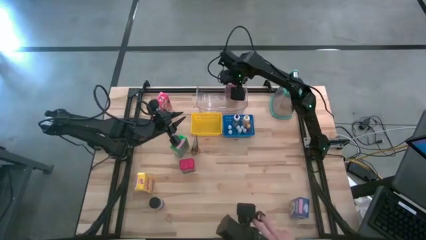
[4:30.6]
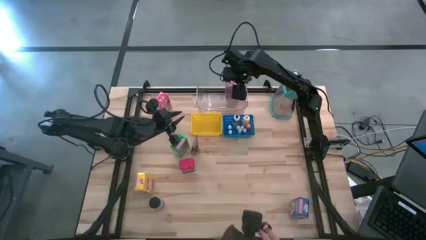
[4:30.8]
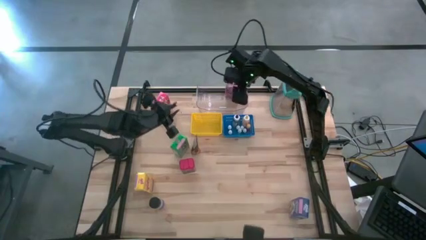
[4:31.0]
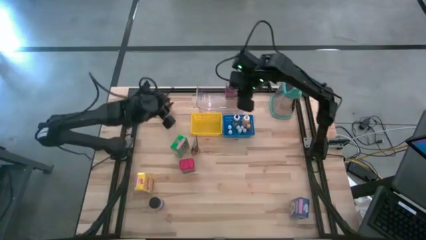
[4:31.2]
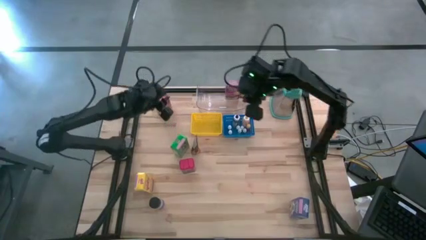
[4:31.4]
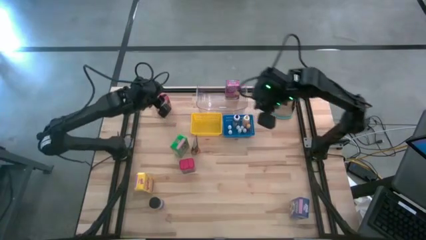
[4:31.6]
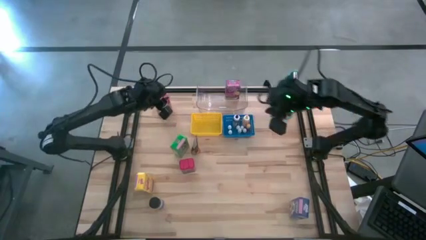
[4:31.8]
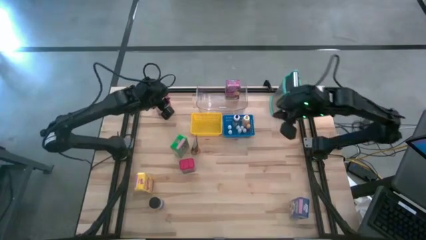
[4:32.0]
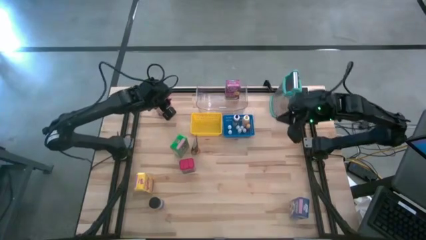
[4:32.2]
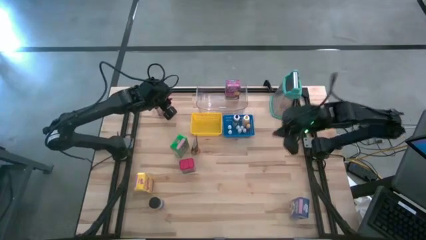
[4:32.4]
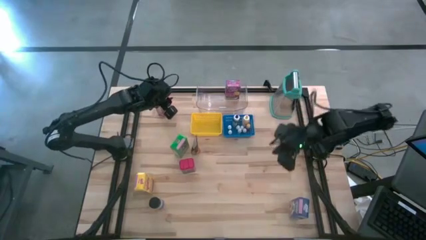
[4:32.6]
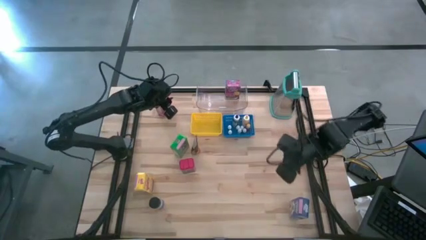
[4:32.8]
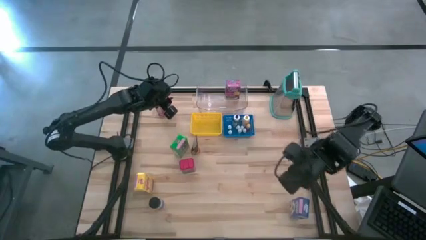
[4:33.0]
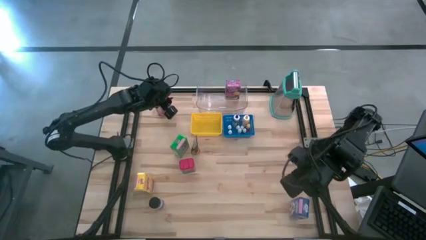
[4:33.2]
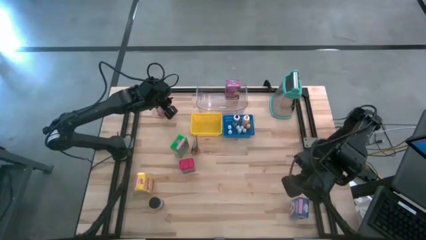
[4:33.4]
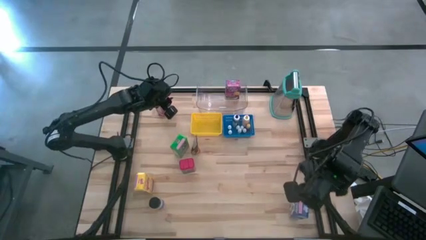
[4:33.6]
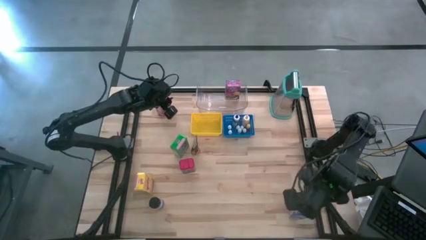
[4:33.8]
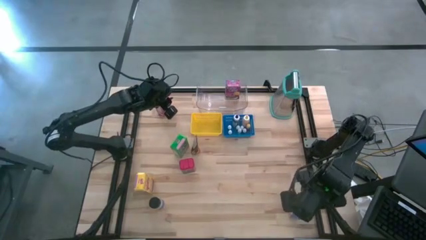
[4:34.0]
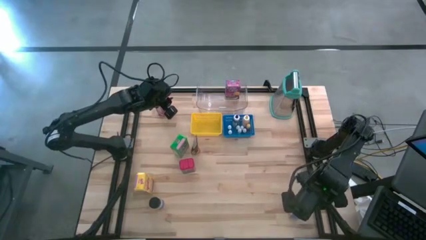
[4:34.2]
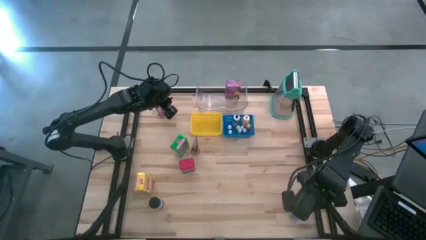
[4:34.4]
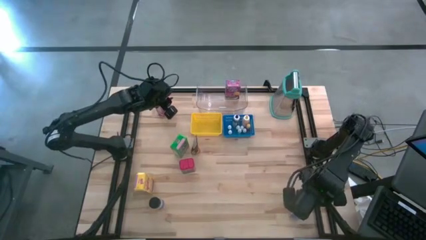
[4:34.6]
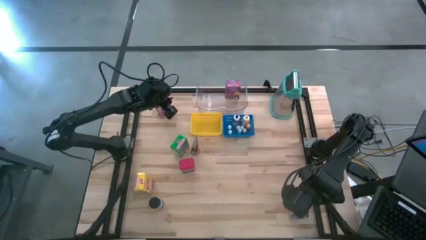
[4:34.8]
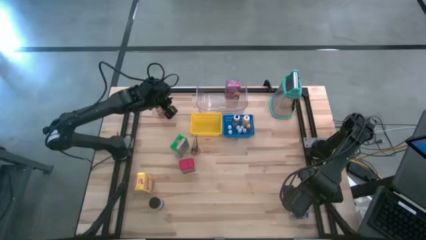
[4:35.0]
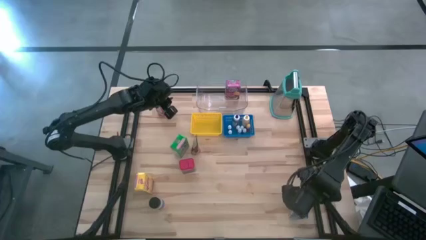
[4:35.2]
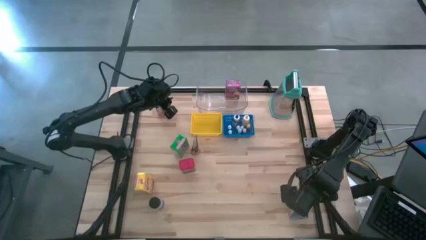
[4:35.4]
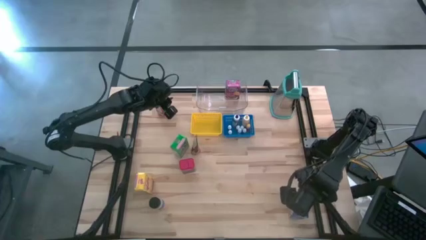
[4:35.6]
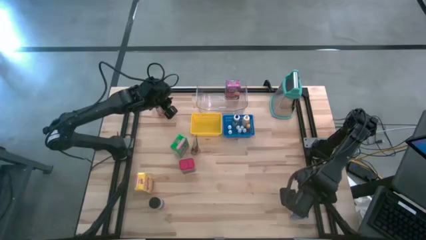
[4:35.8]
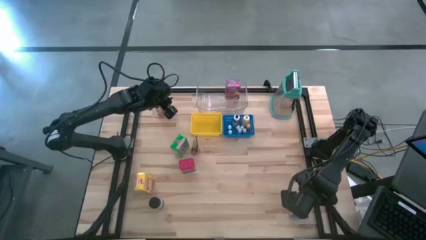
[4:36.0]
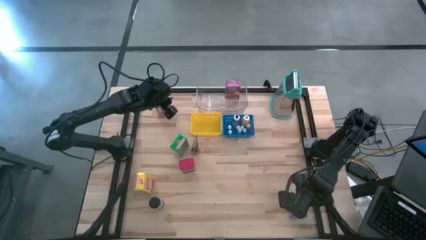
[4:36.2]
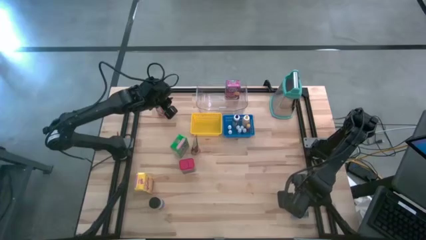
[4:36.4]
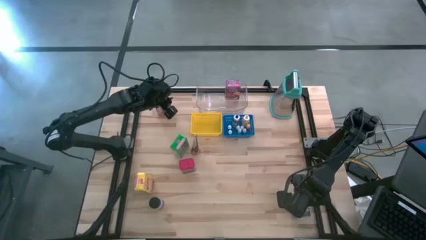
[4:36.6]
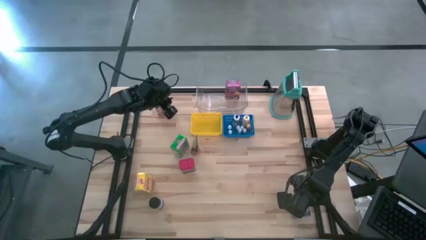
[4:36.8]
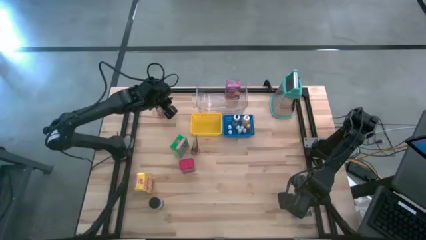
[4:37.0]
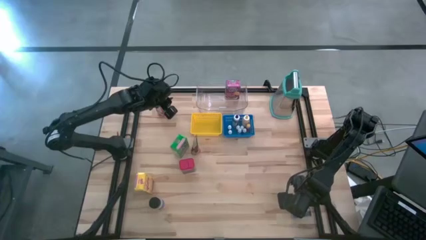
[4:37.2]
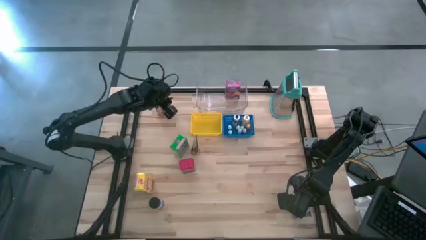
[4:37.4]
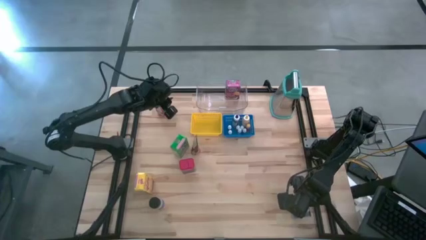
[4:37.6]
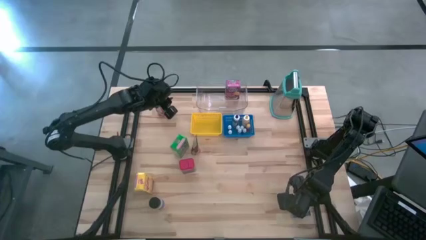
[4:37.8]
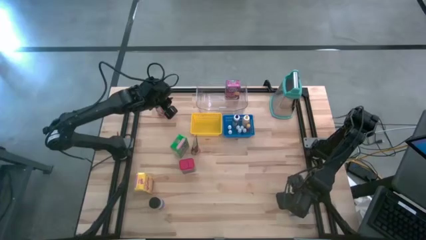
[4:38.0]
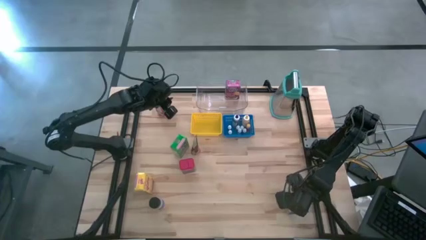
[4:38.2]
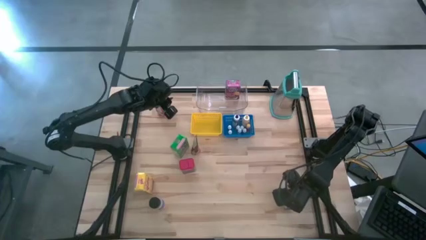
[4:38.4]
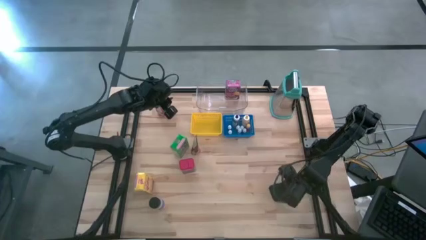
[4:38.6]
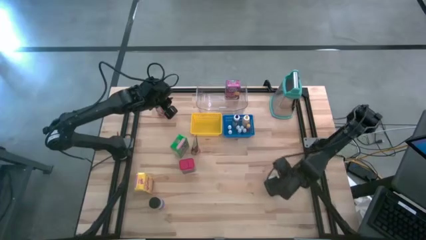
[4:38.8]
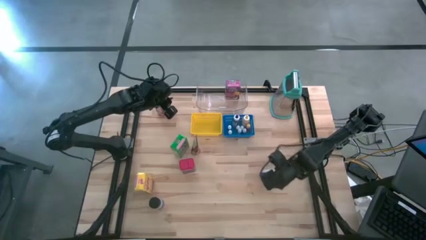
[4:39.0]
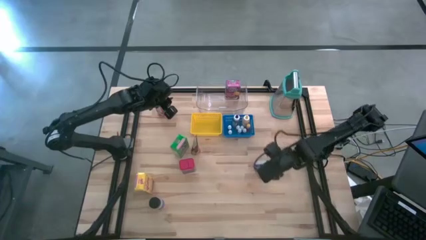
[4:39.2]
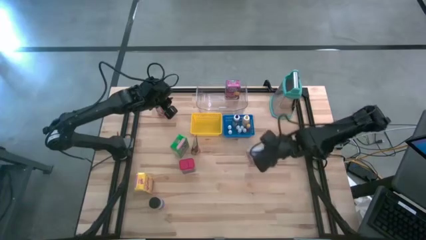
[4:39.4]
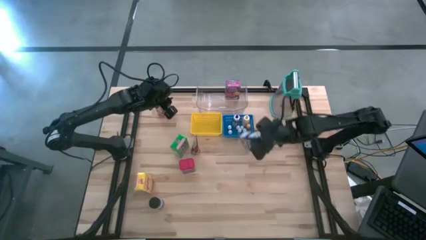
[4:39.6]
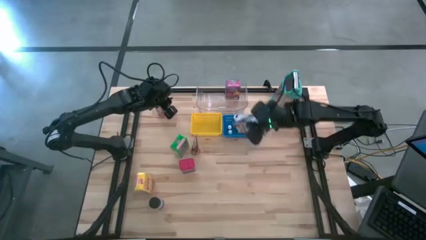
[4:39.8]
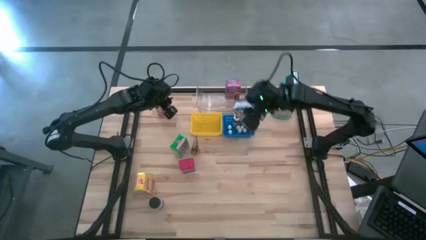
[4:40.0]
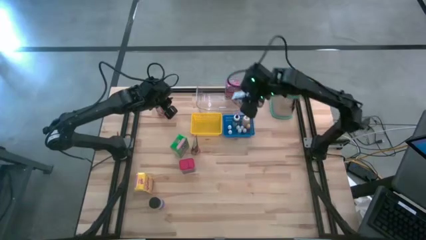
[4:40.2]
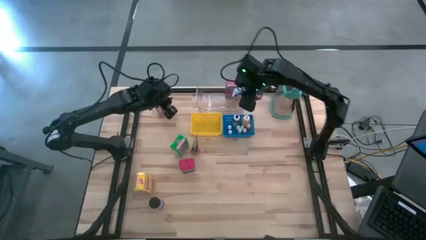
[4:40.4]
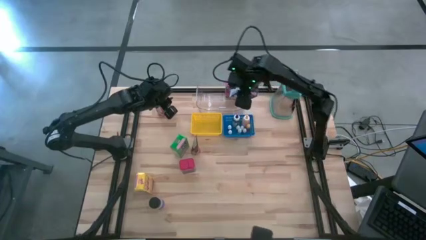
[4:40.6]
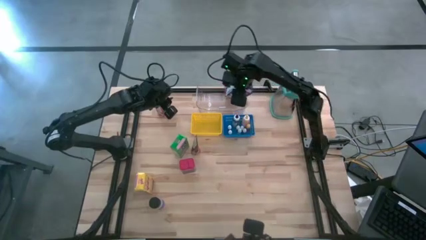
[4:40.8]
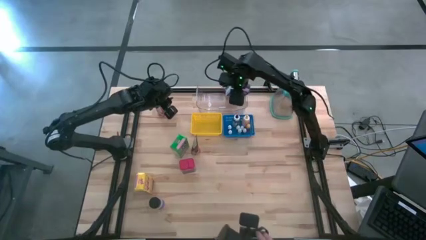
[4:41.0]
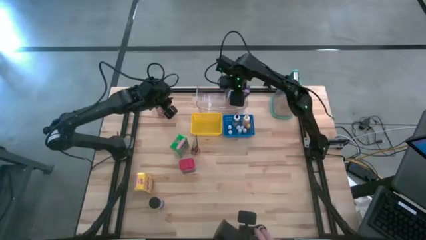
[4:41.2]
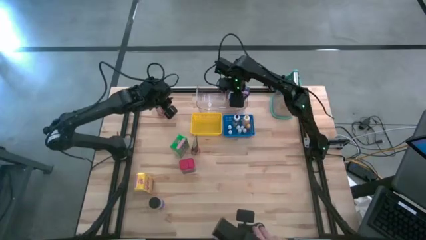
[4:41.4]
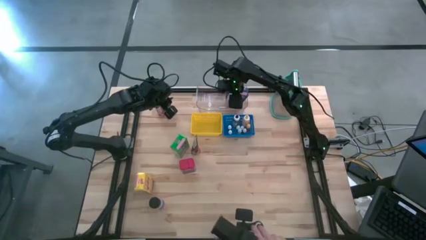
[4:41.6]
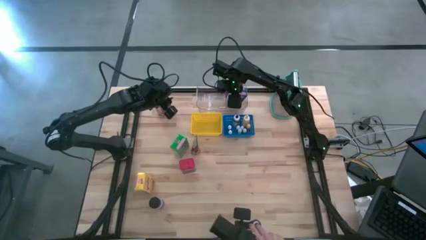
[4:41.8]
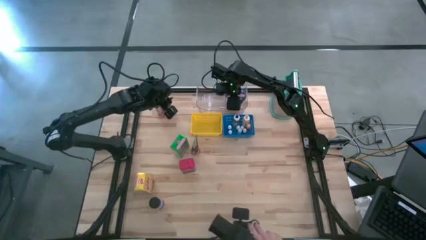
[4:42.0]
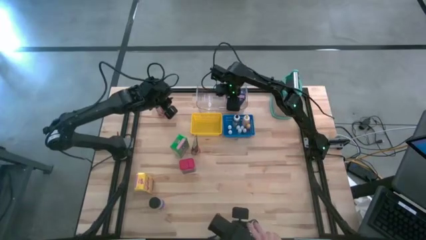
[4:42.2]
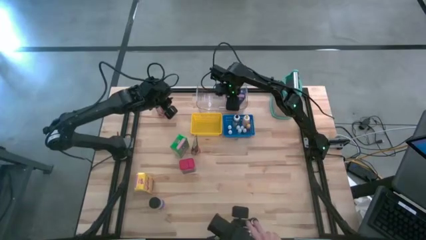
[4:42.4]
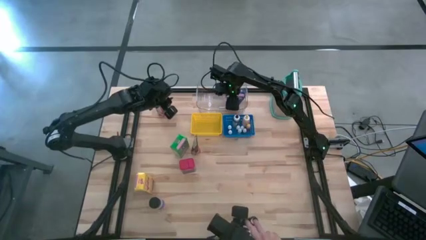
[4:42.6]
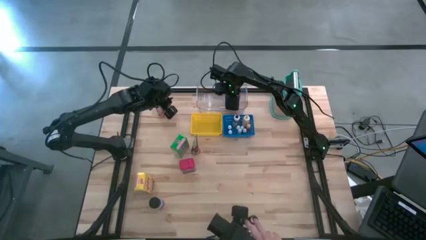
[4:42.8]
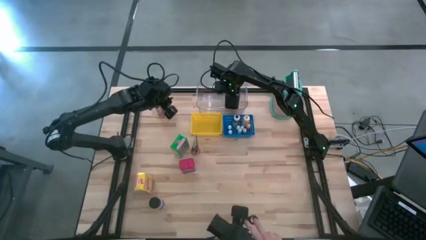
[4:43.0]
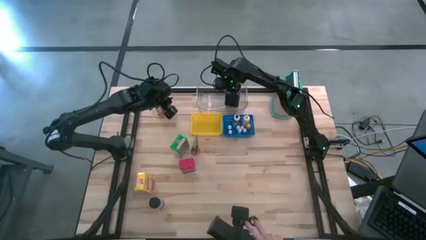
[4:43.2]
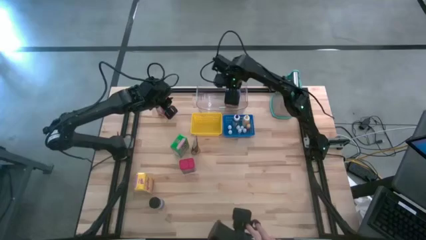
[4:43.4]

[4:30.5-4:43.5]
Task: Pick & Place Kitchen Items
Put the blue cereal box into the transparent bin
